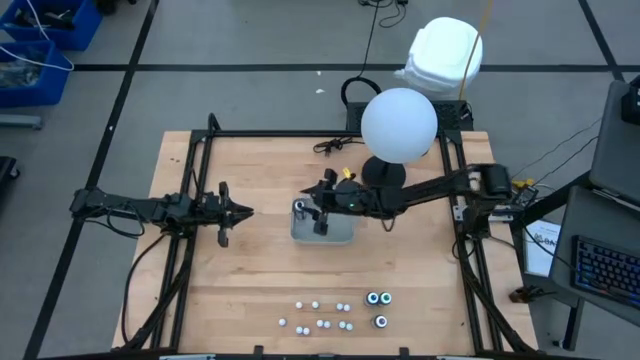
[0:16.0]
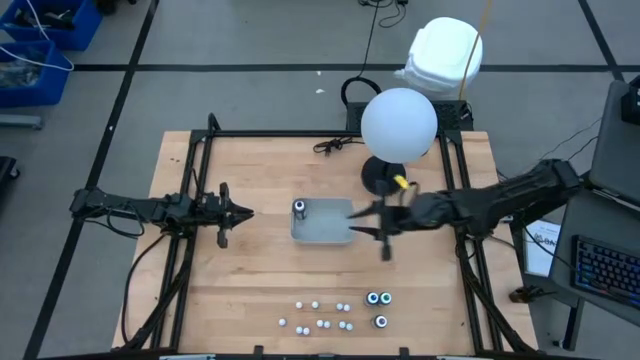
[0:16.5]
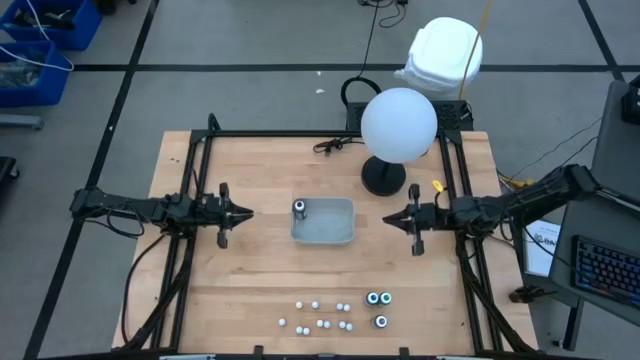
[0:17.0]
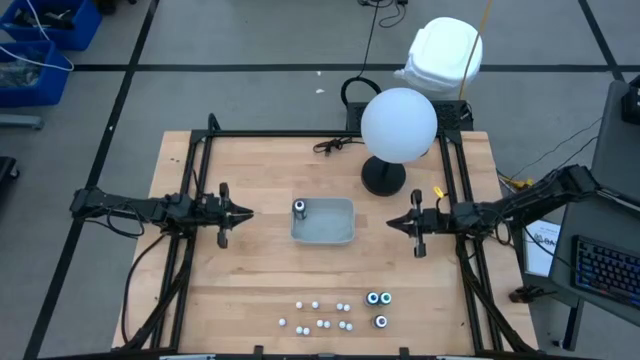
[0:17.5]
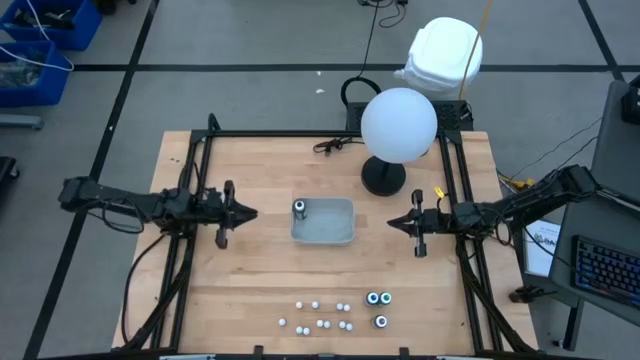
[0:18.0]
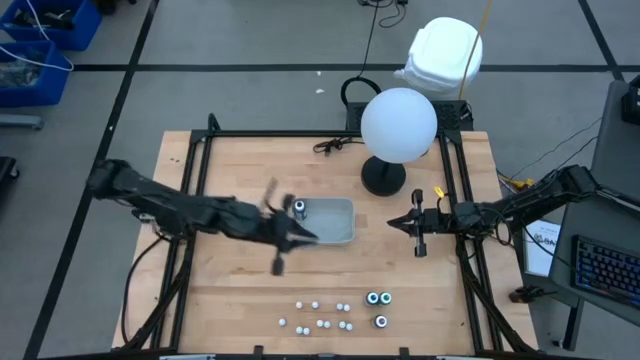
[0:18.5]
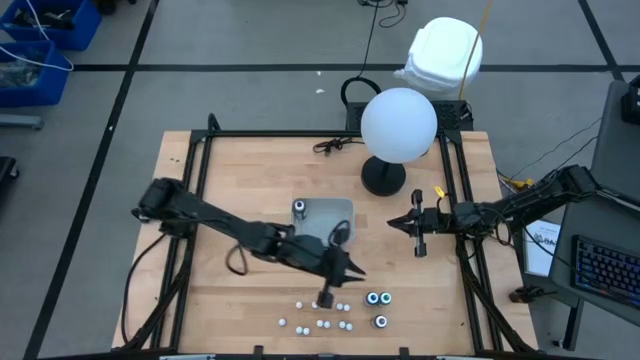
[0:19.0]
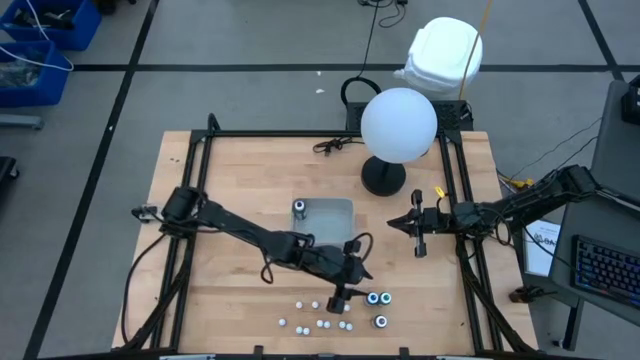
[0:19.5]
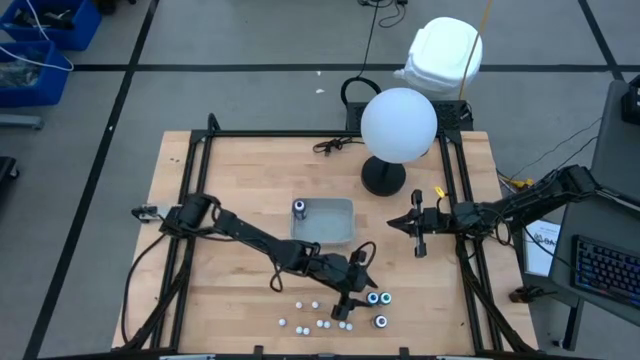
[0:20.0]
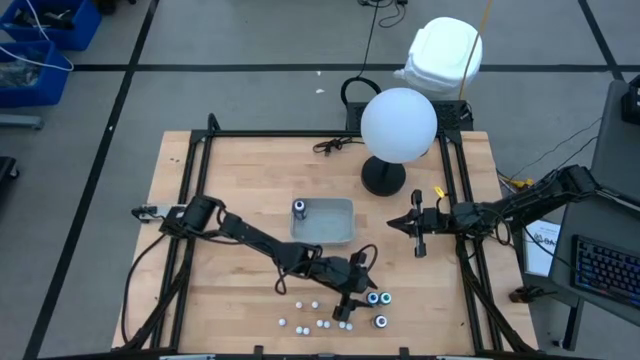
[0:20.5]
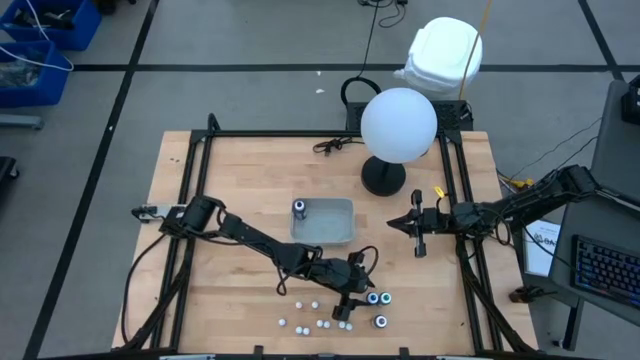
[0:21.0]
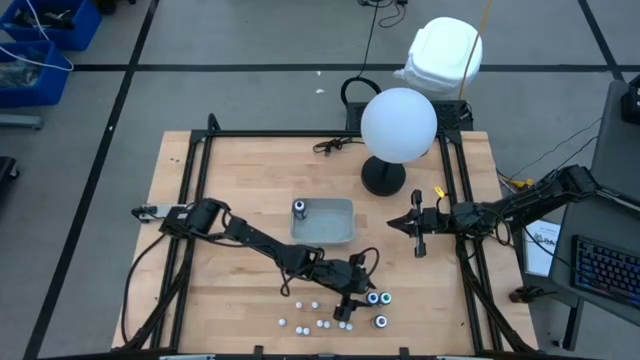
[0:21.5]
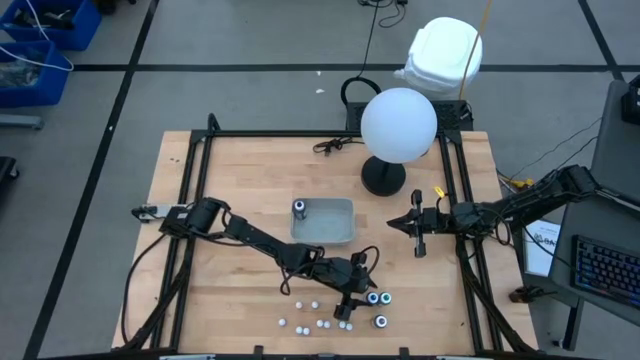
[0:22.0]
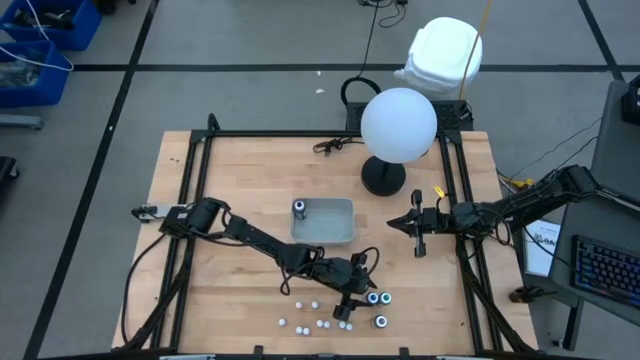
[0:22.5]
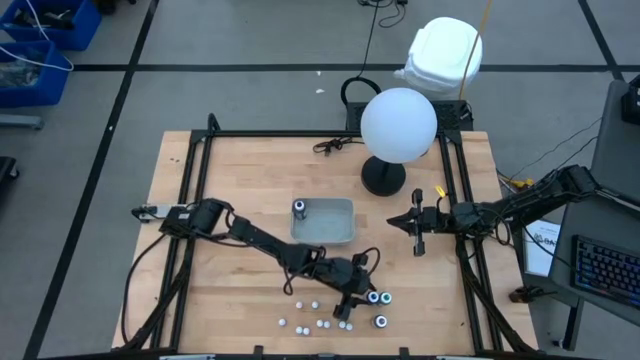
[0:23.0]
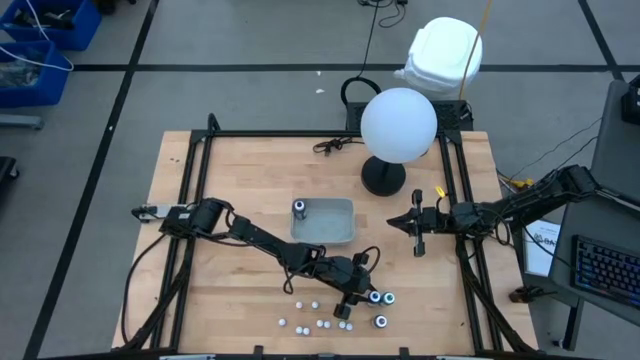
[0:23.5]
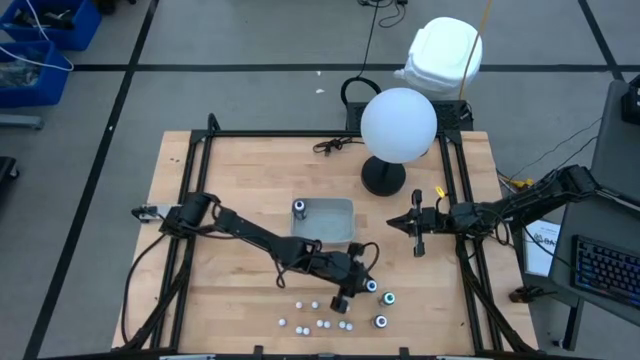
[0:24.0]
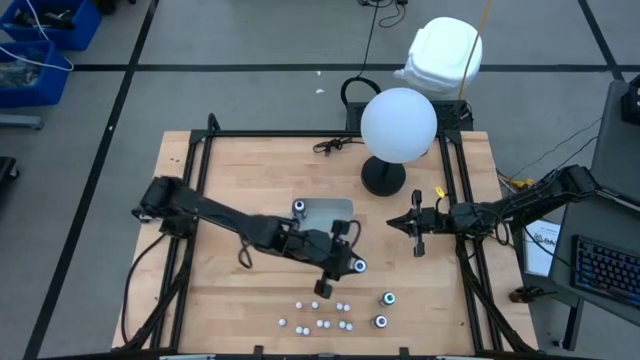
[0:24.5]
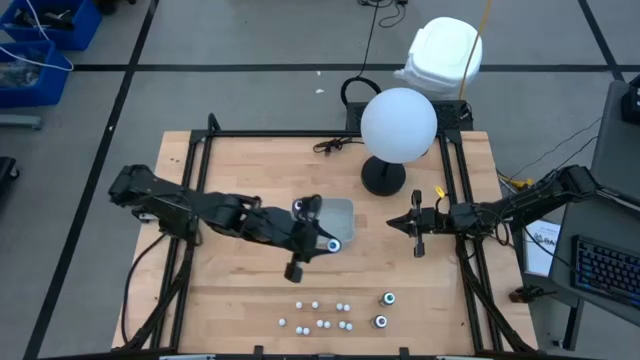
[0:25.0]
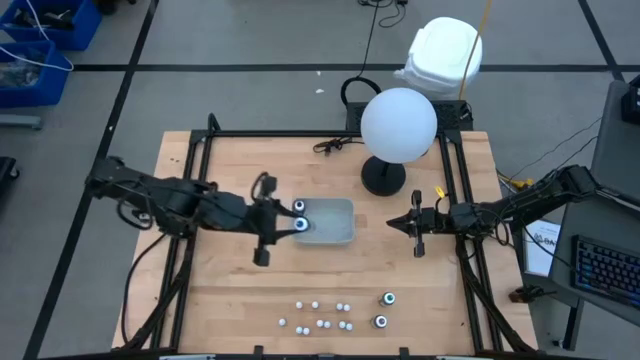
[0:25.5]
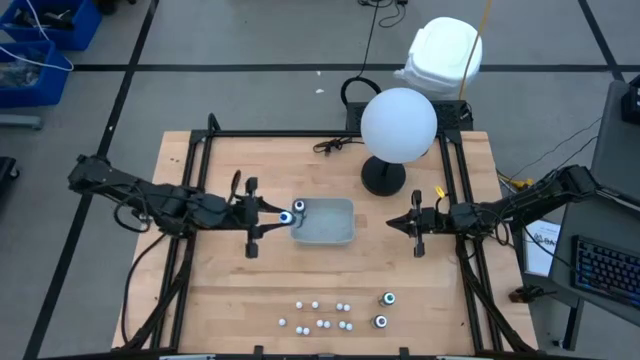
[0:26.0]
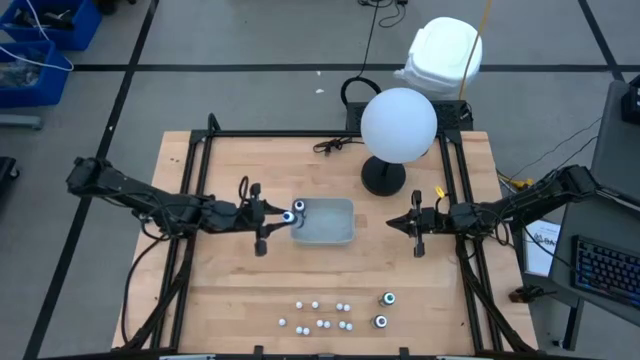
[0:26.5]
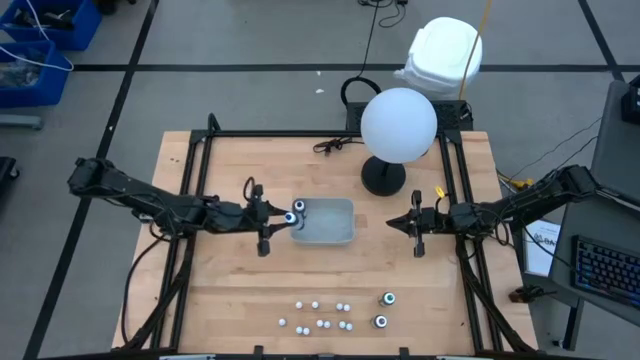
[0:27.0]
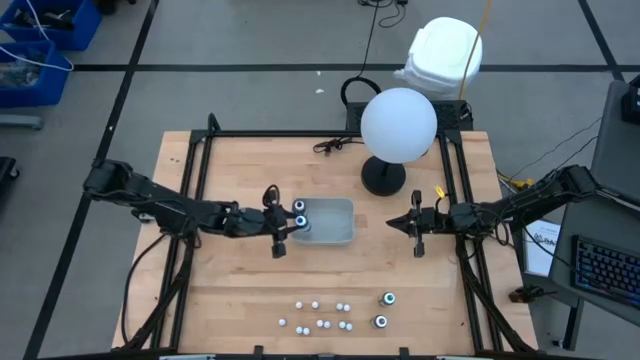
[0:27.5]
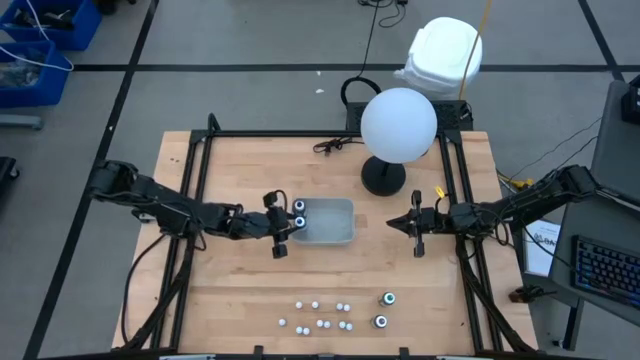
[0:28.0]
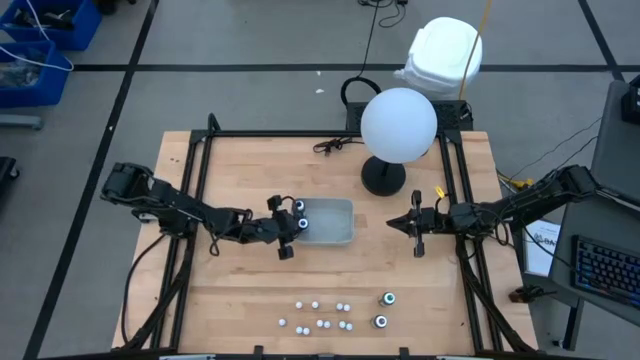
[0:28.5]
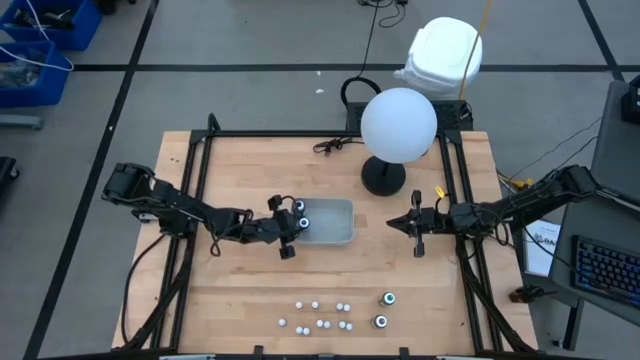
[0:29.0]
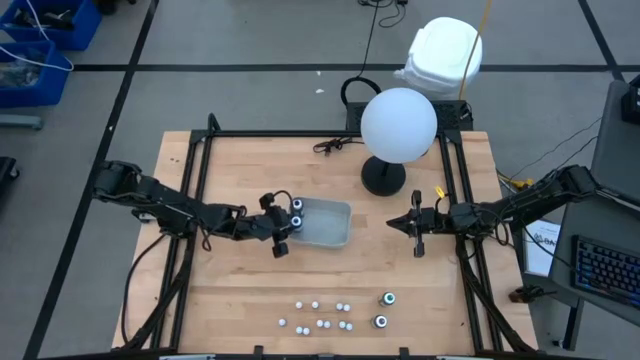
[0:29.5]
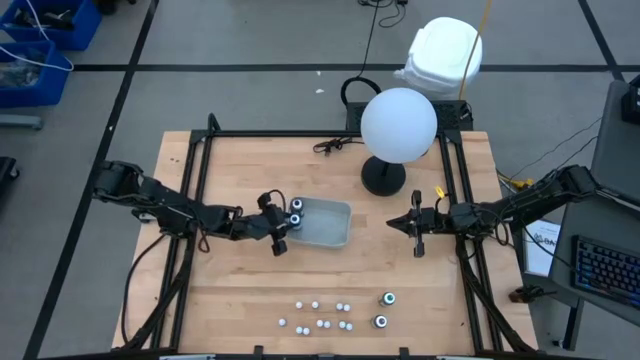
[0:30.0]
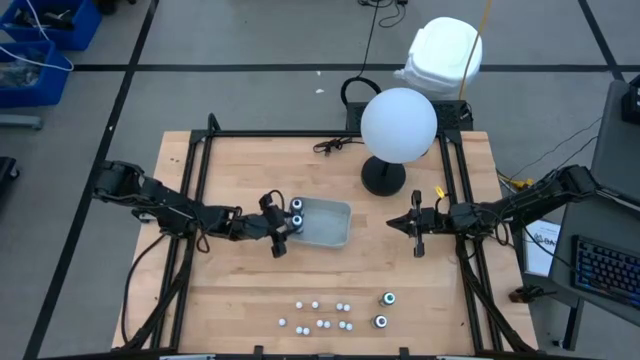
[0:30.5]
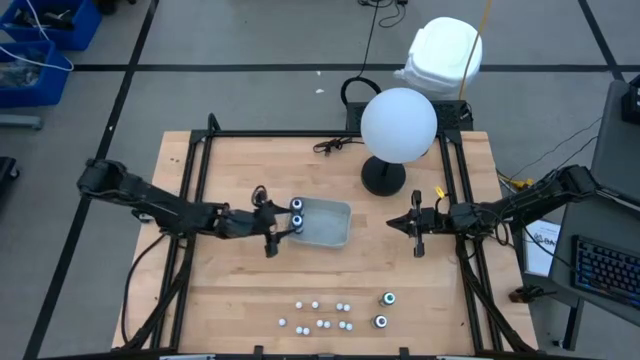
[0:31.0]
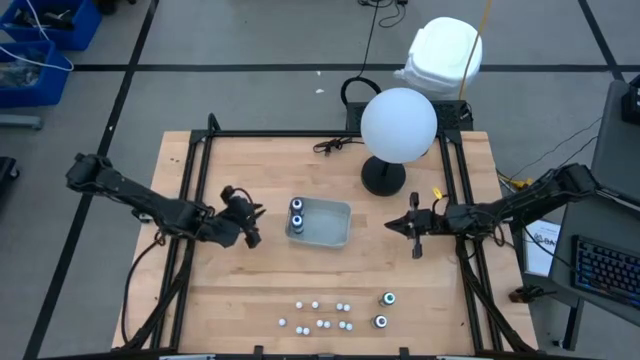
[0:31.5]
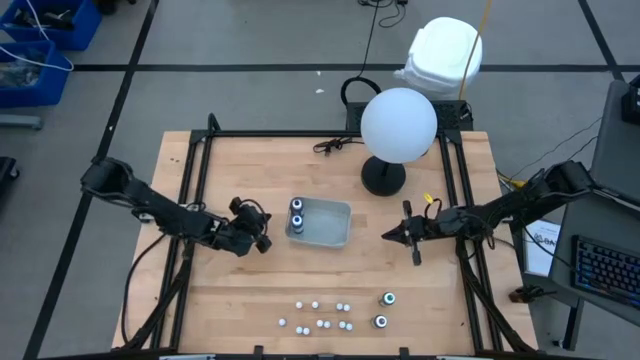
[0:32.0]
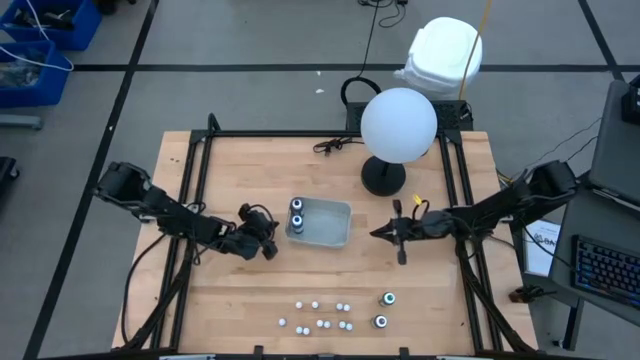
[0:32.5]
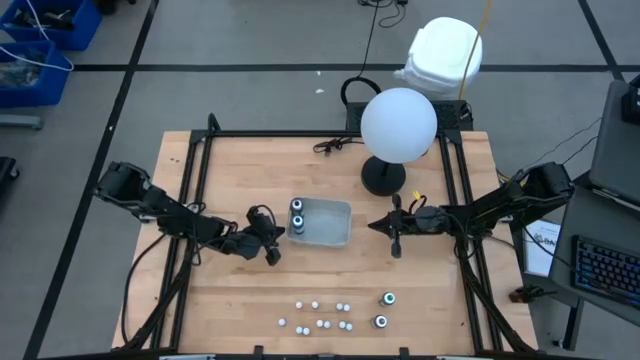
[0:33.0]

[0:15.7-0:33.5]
Task: Pick & Place food coloring
Adjust the gray bin

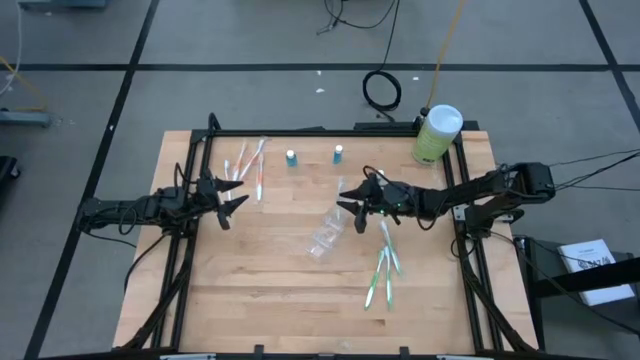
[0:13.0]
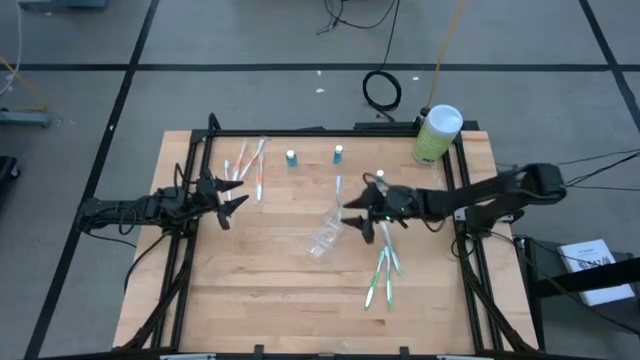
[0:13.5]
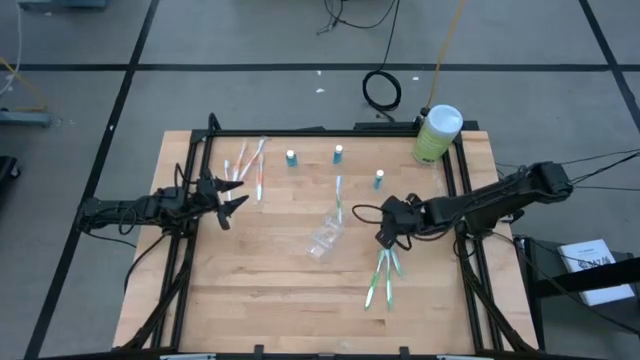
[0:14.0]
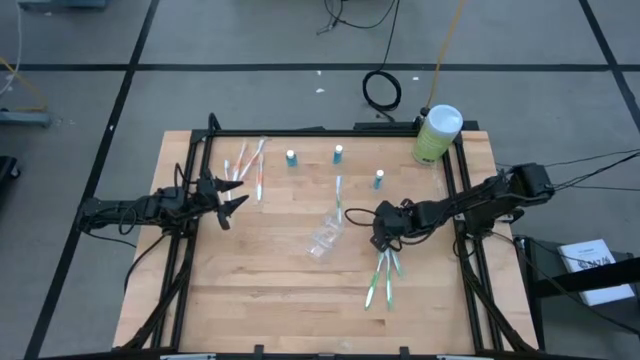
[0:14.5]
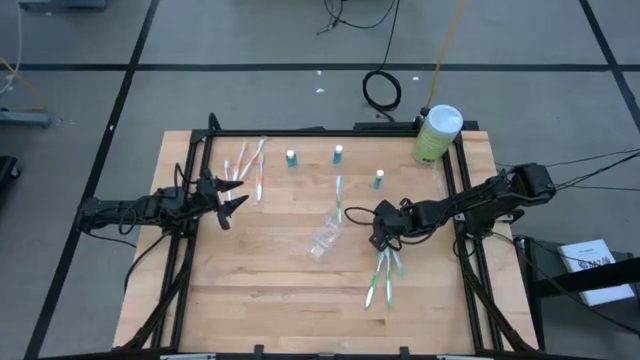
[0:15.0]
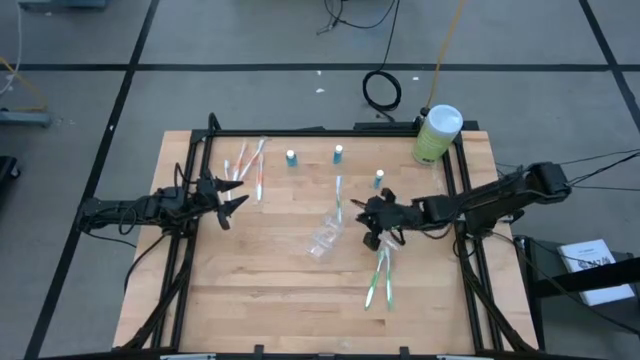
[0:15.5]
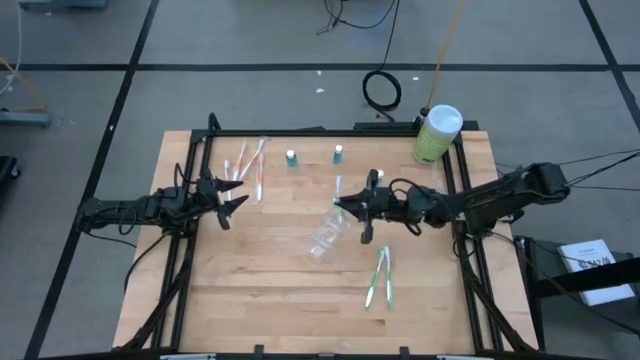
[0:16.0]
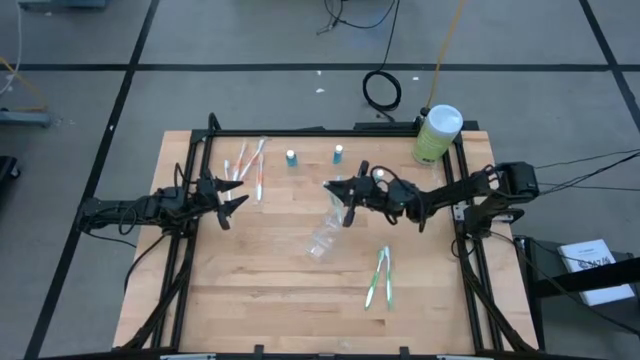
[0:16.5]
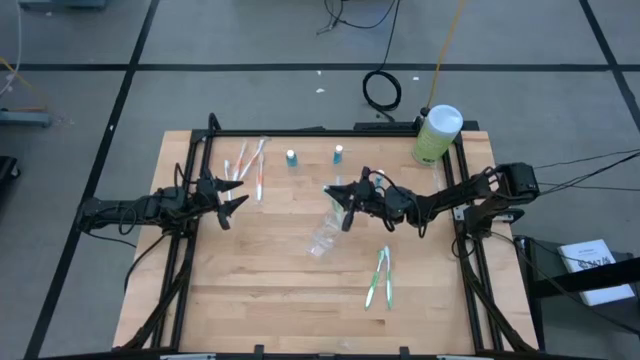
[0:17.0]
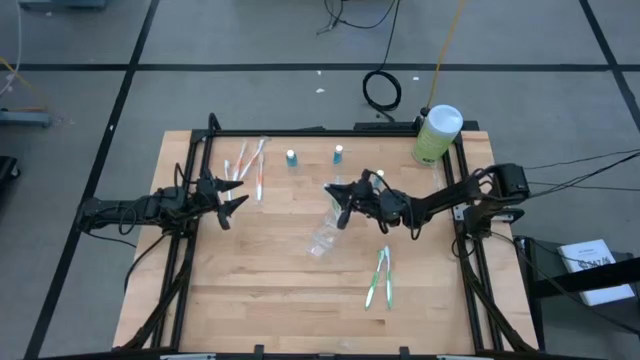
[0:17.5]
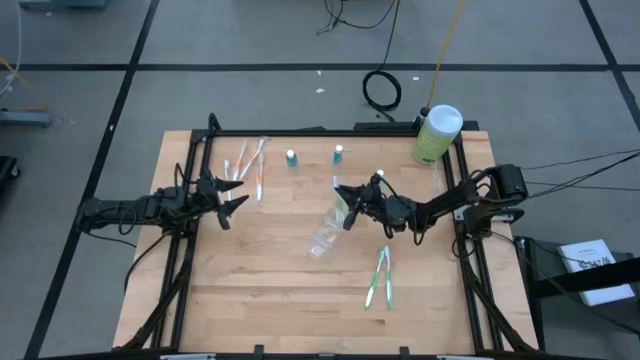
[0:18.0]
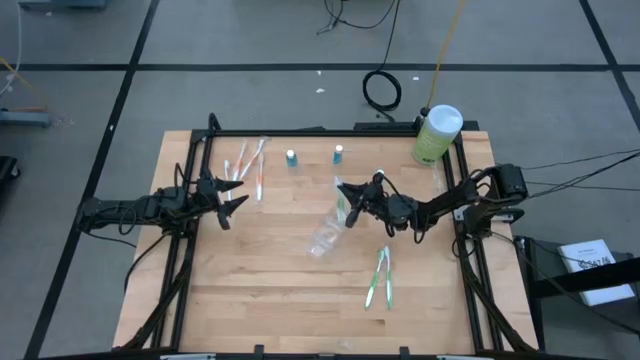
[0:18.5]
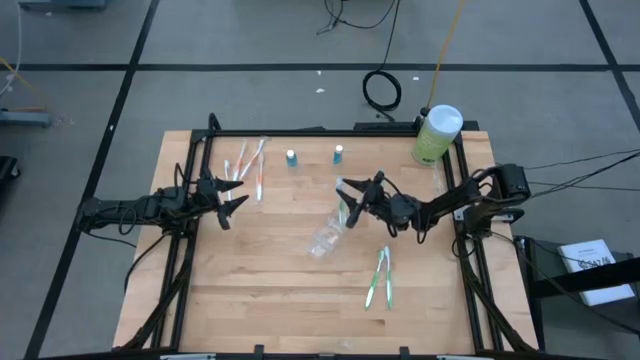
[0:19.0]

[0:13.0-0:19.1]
Task: Pick & Place toothbrushing station
Put the green toothbrush into the transparent organizer
